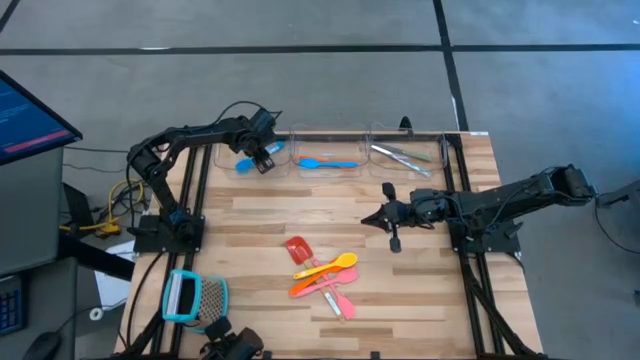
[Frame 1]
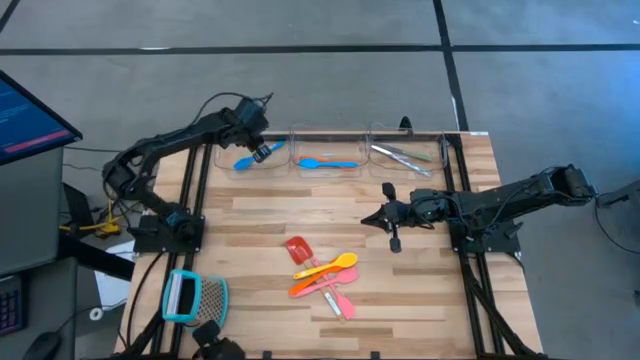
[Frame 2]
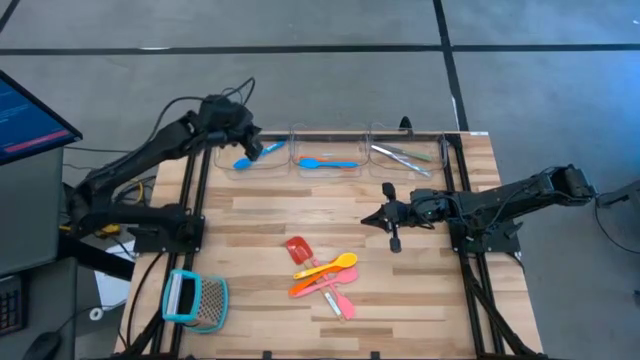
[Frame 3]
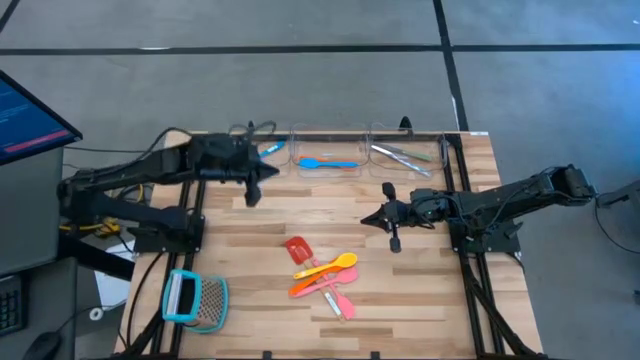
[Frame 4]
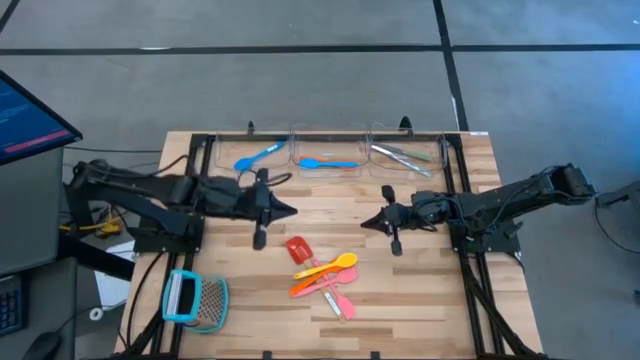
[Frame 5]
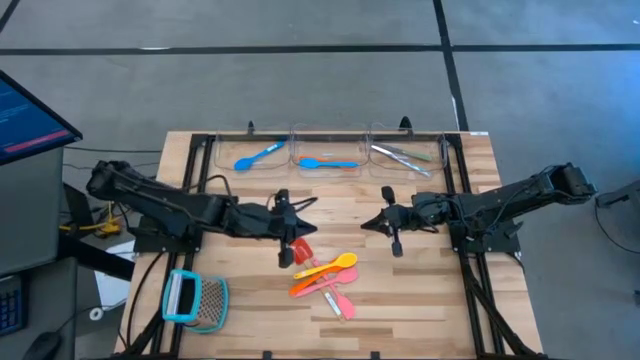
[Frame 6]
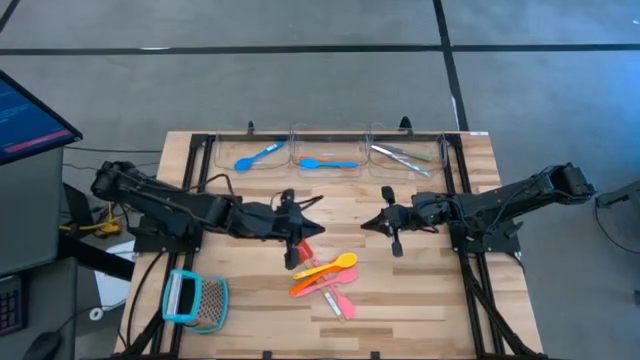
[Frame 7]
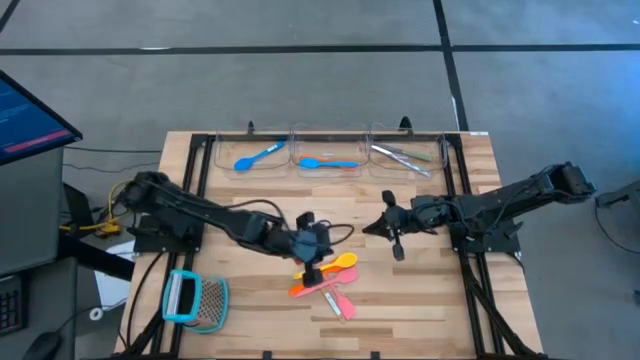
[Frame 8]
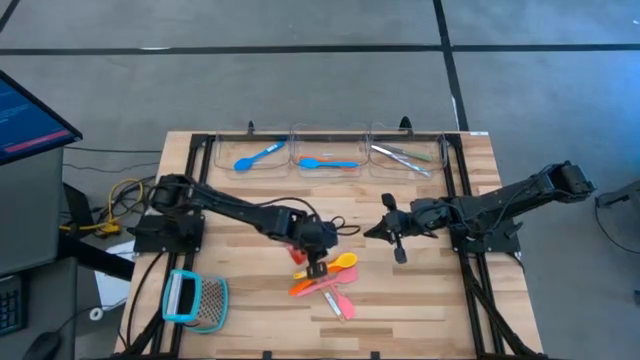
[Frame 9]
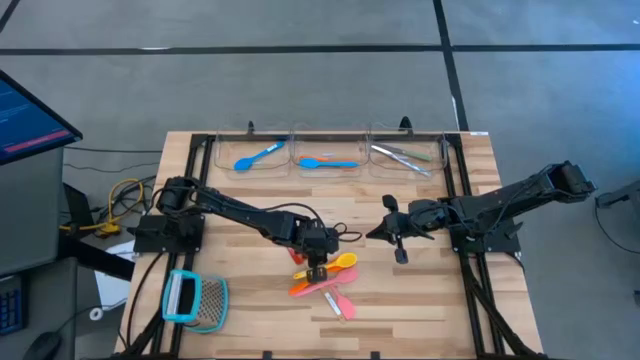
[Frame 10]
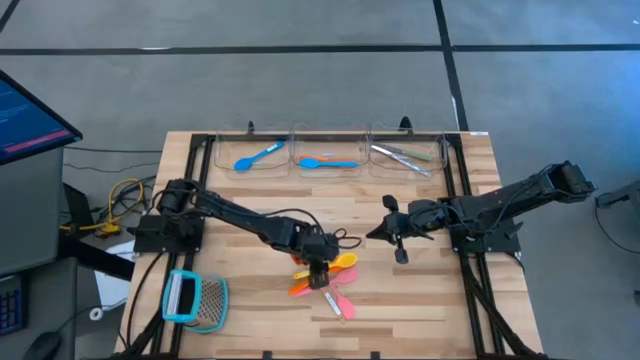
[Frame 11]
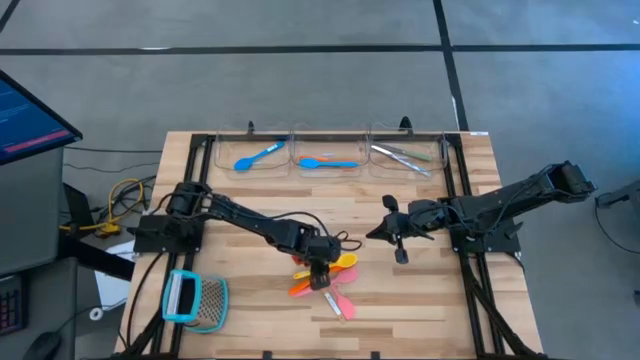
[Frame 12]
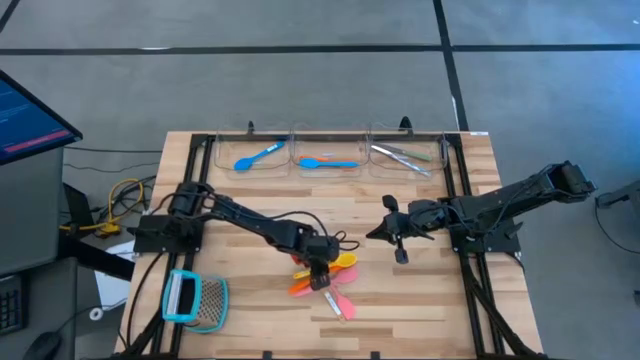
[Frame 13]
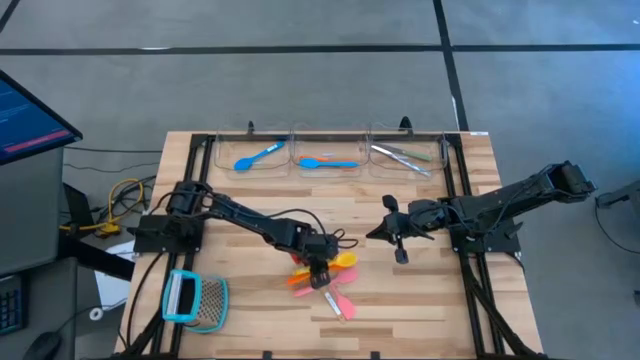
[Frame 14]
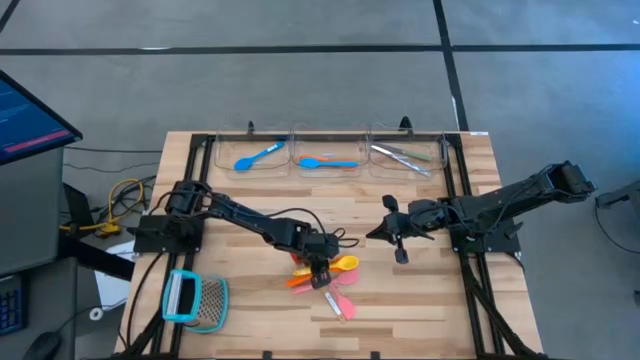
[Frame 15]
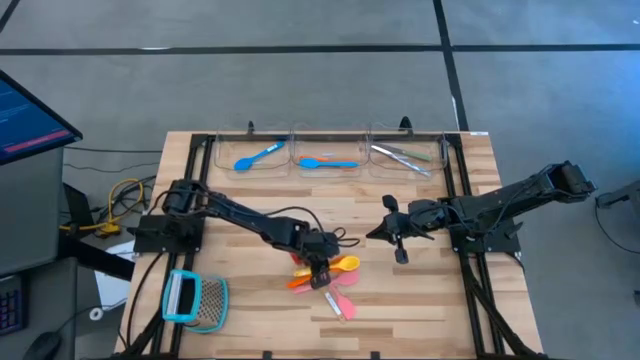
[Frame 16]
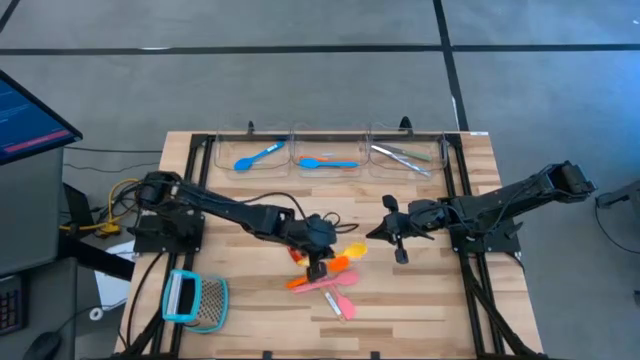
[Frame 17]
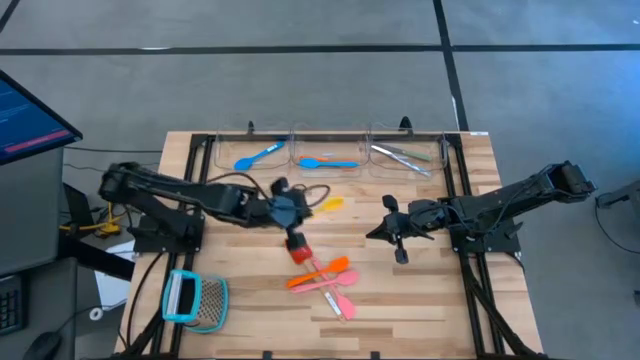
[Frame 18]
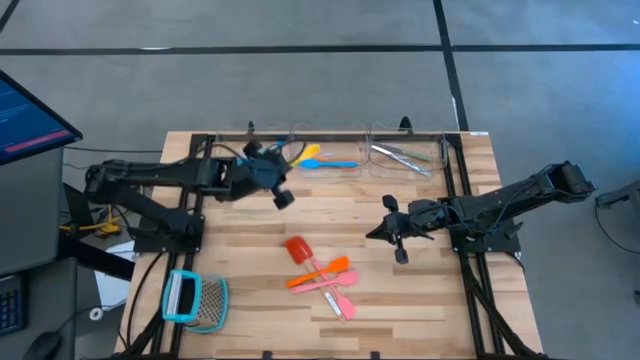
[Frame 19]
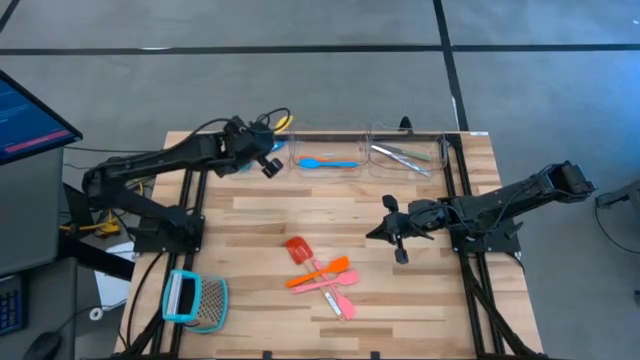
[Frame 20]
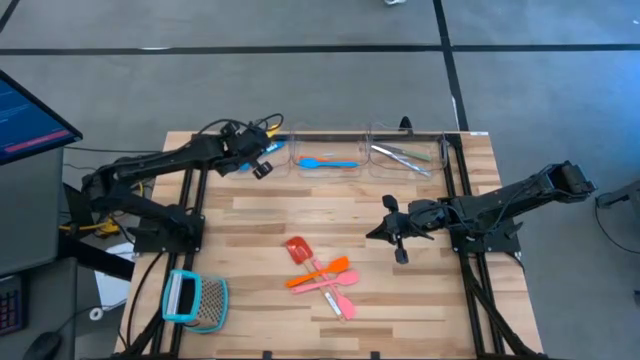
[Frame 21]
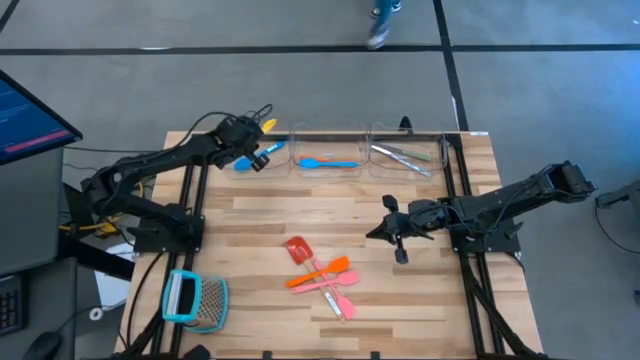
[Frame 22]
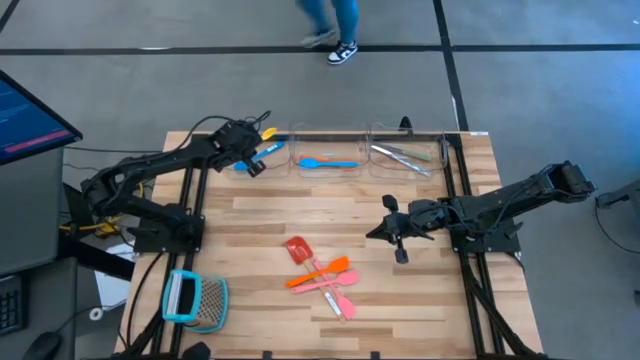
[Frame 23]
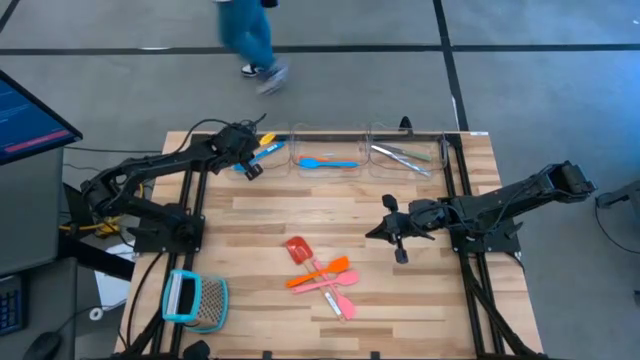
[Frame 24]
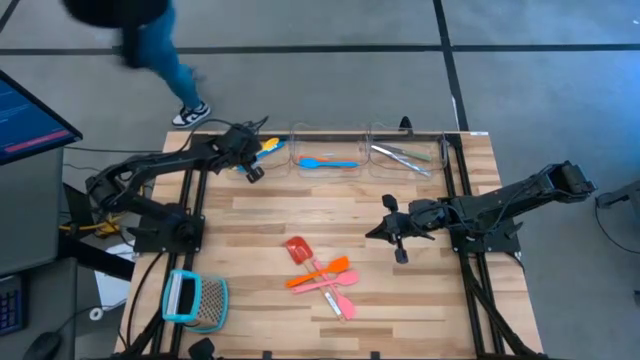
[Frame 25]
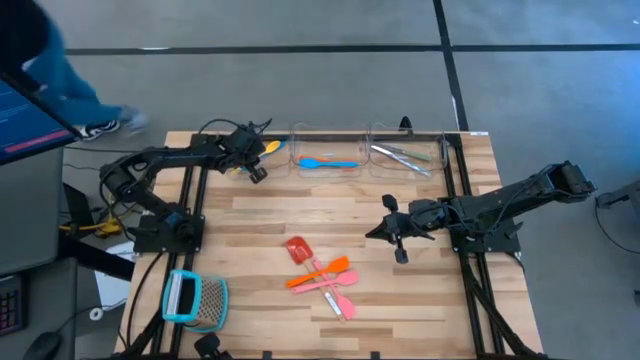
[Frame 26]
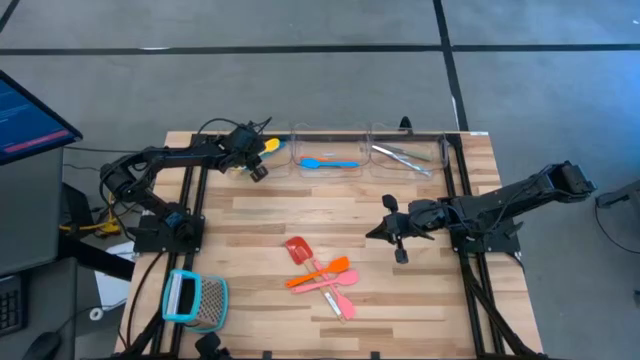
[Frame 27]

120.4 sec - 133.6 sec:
Task: Pick & Place Kitchen Items
Put the yellow serving spoon into the left transparent bin

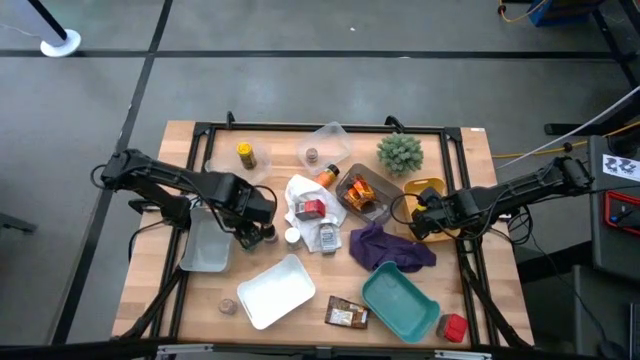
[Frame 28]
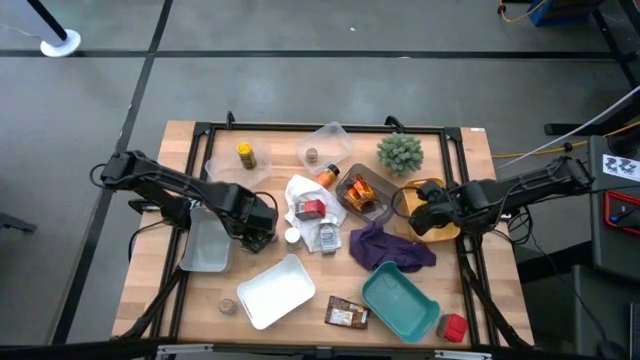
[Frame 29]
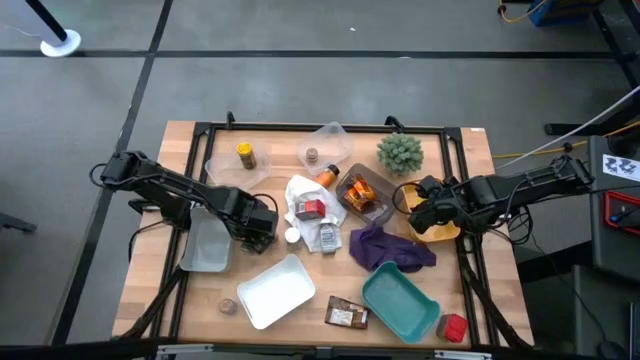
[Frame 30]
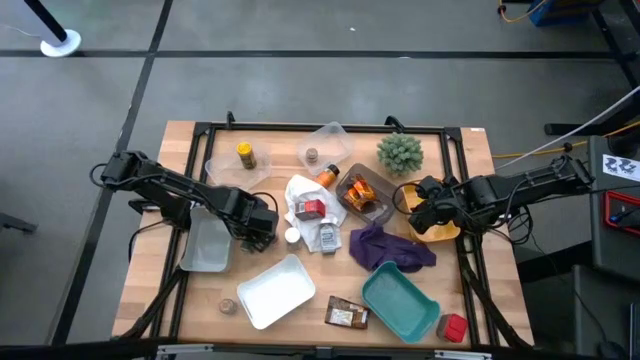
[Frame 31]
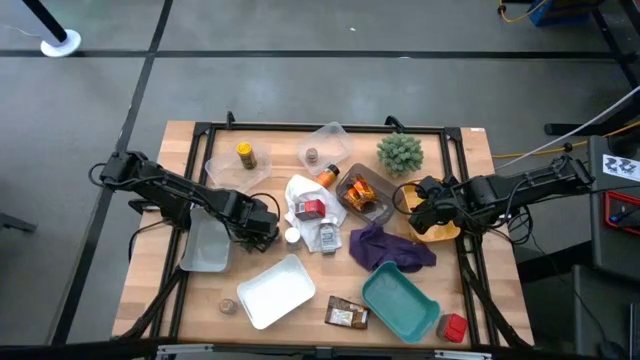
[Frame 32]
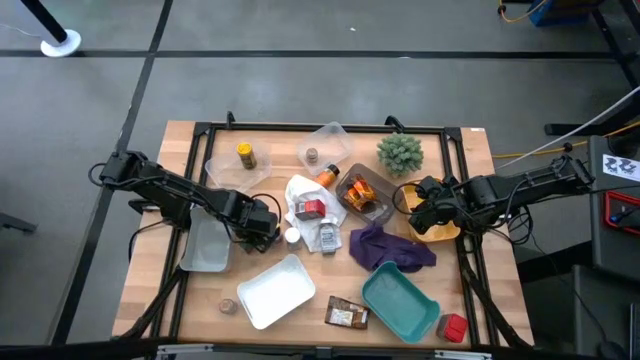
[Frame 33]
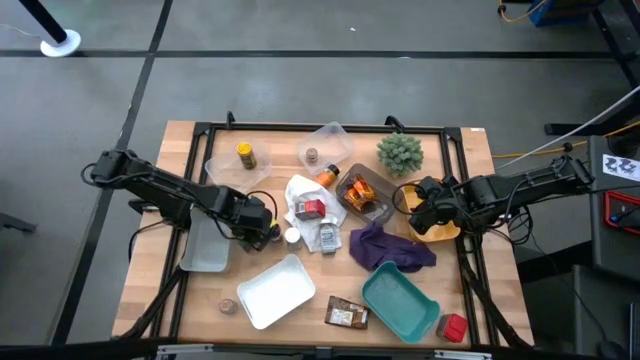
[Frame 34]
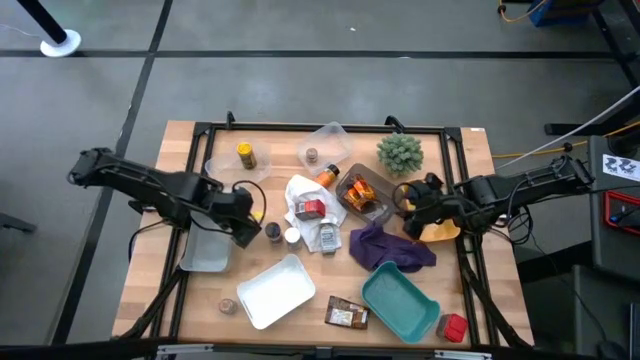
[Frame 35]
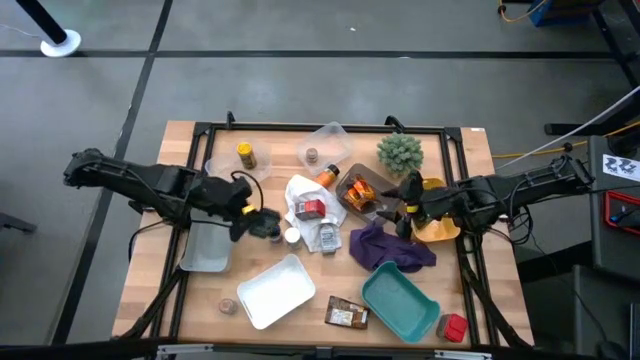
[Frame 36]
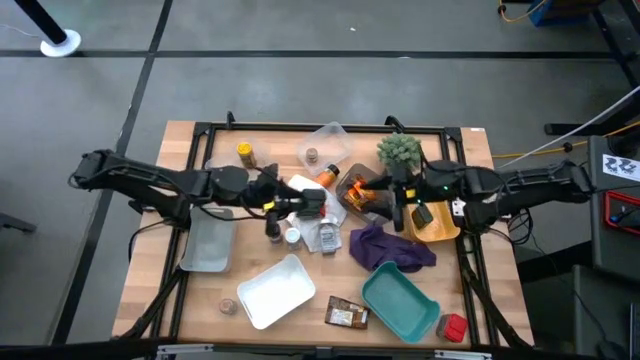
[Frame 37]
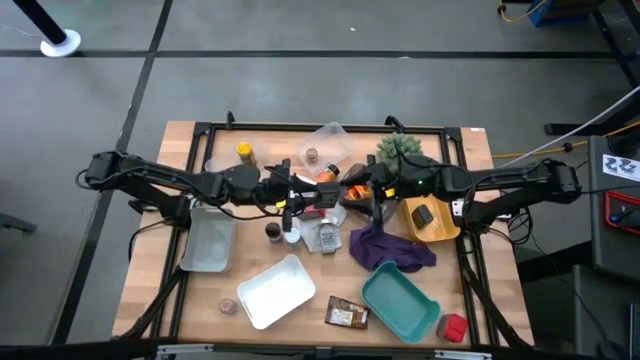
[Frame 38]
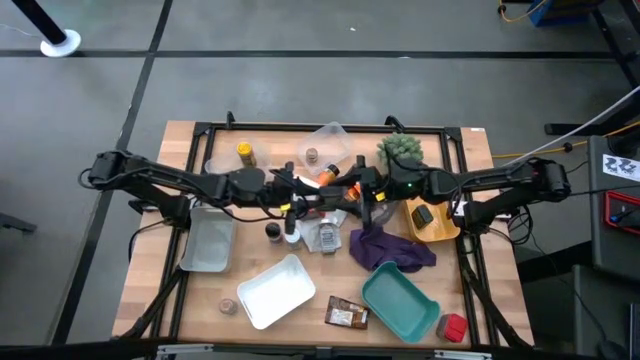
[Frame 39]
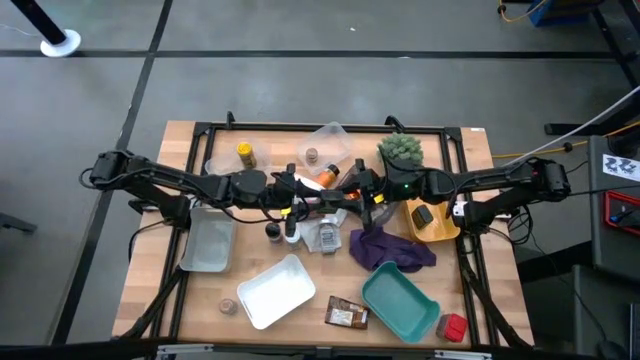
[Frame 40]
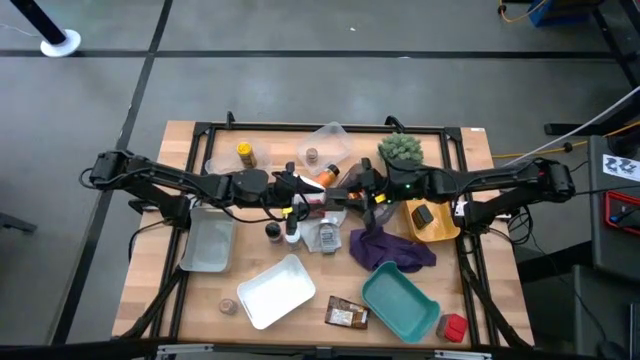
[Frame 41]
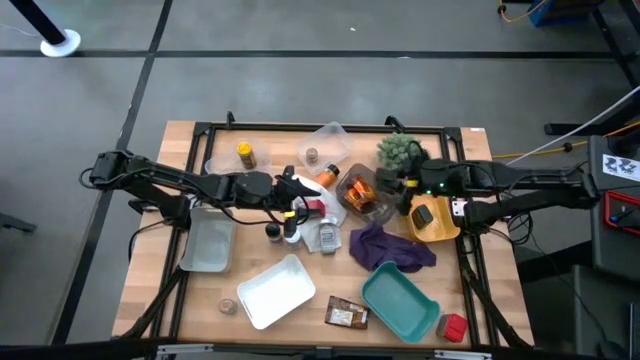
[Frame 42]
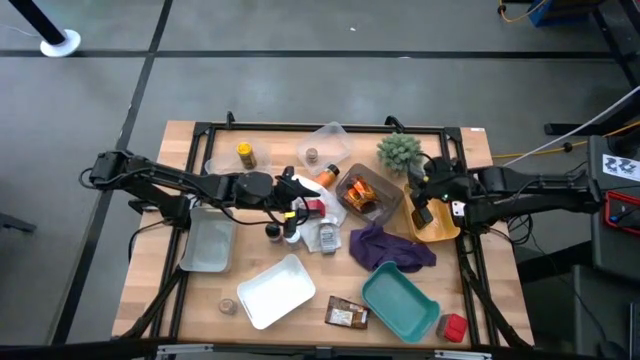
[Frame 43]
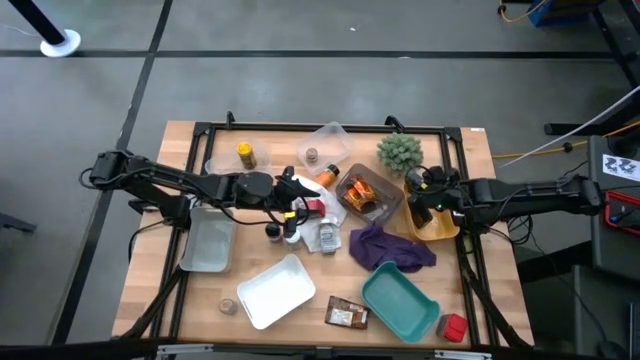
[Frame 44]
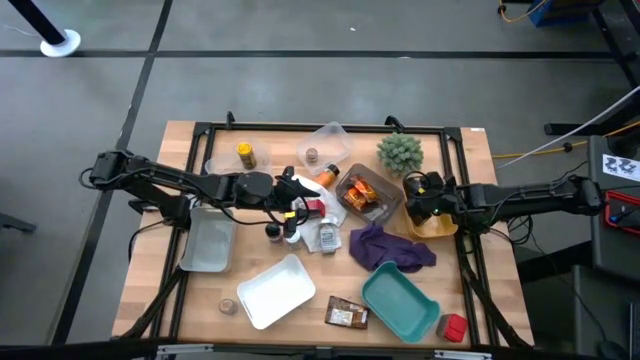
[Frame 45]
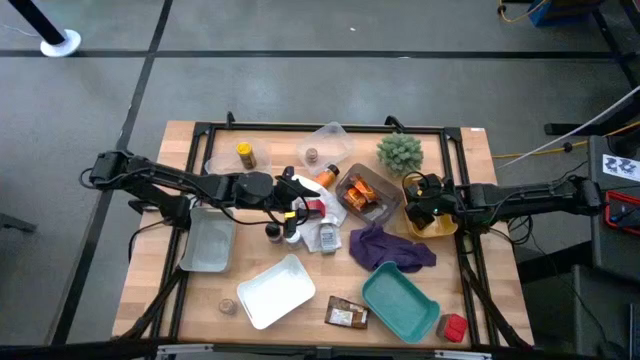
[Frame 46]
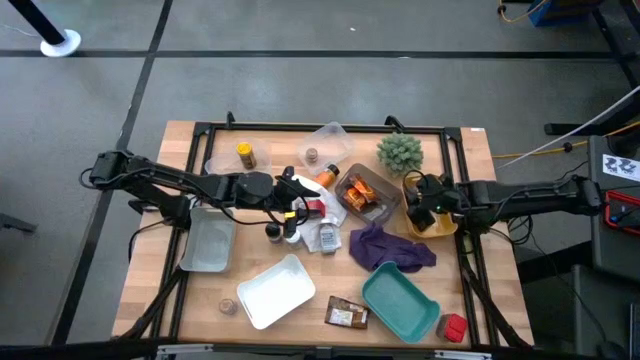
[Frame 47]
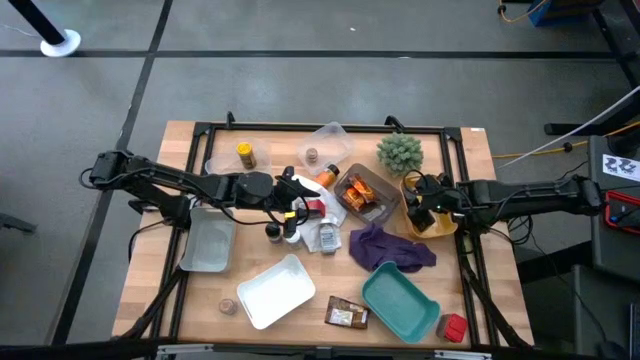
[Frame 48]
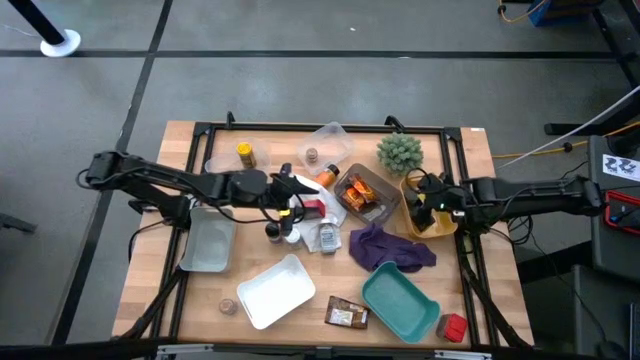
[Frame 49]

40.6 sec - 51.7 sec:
Task: Sort spices by type
Put the black spice can into the yellow bin
